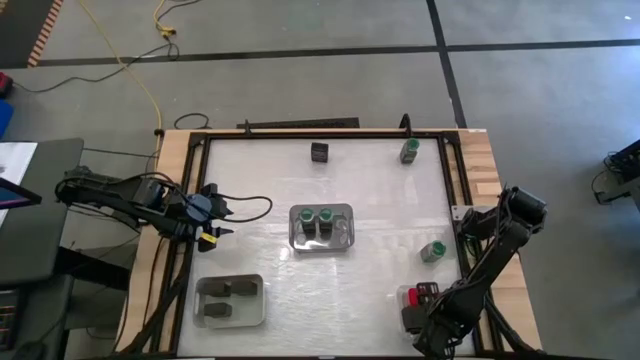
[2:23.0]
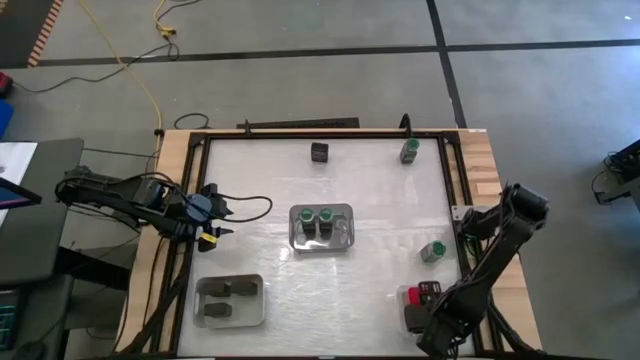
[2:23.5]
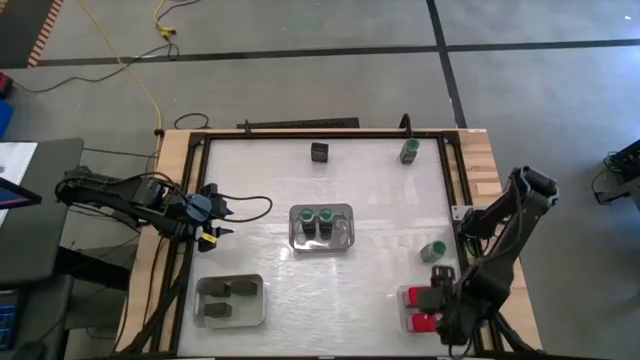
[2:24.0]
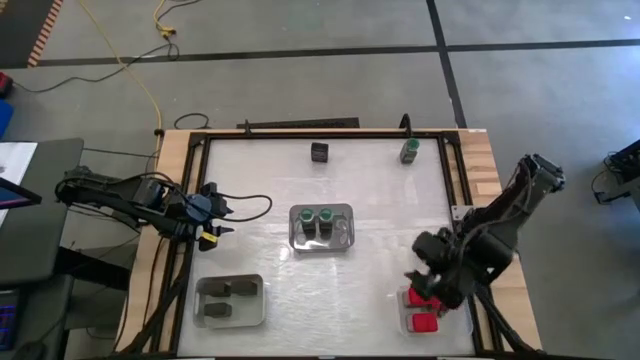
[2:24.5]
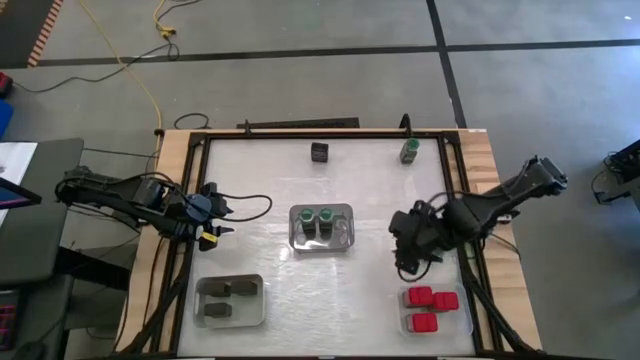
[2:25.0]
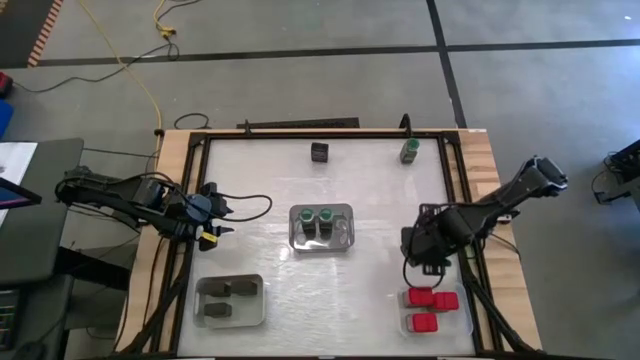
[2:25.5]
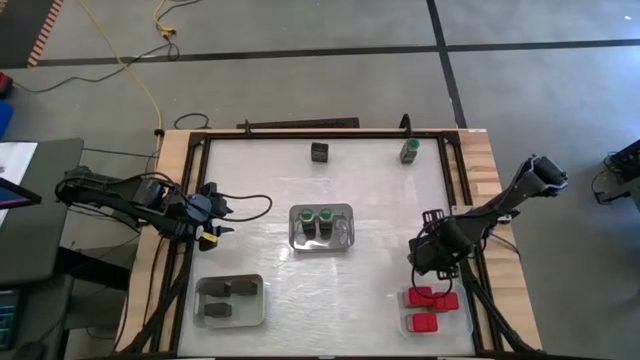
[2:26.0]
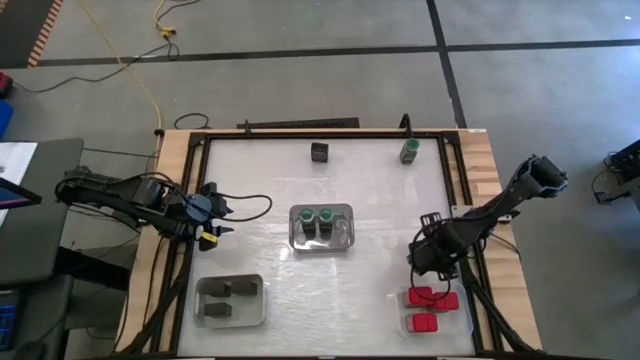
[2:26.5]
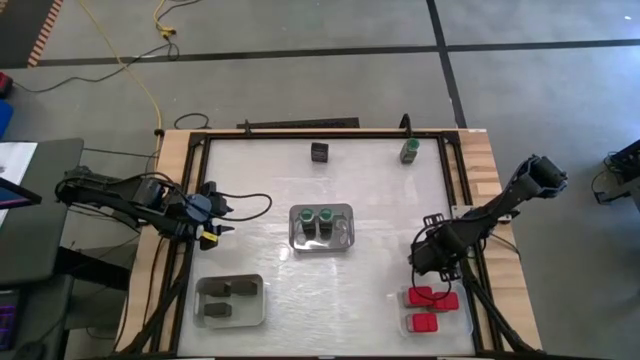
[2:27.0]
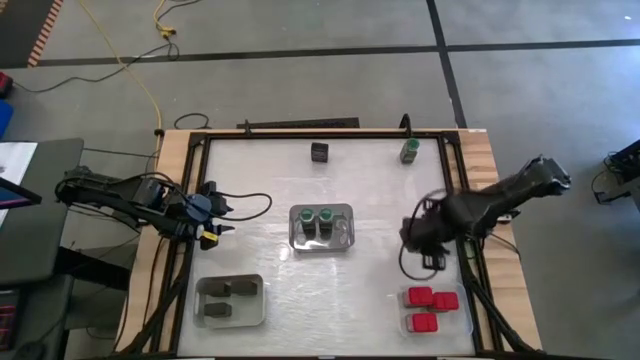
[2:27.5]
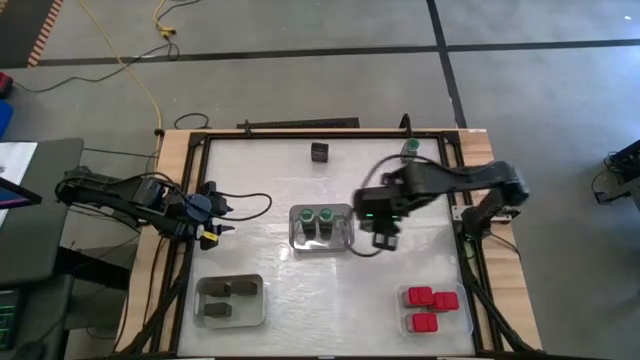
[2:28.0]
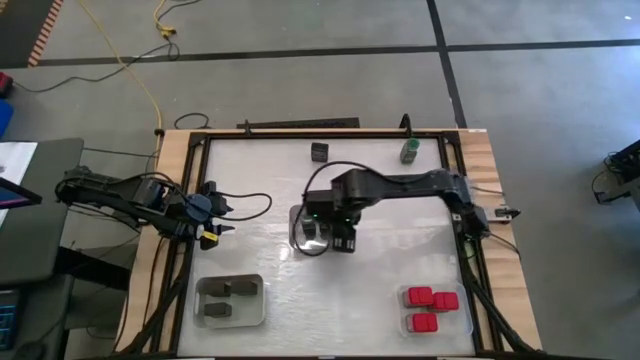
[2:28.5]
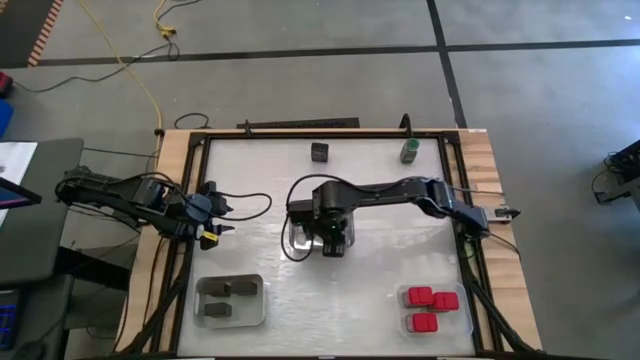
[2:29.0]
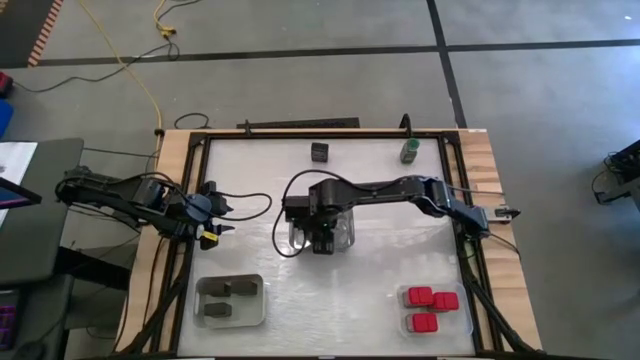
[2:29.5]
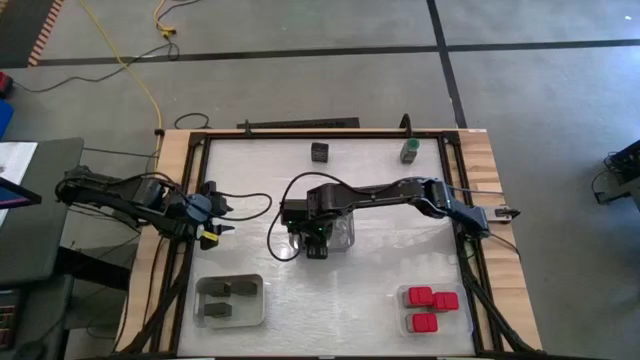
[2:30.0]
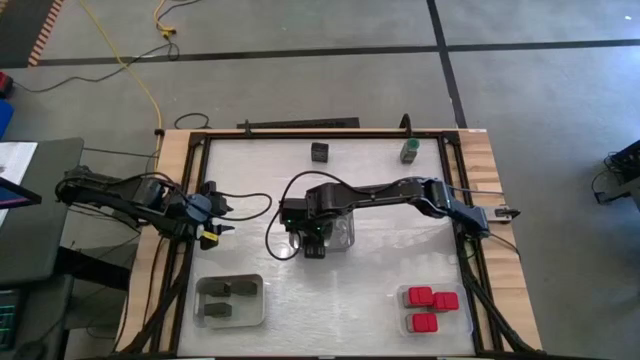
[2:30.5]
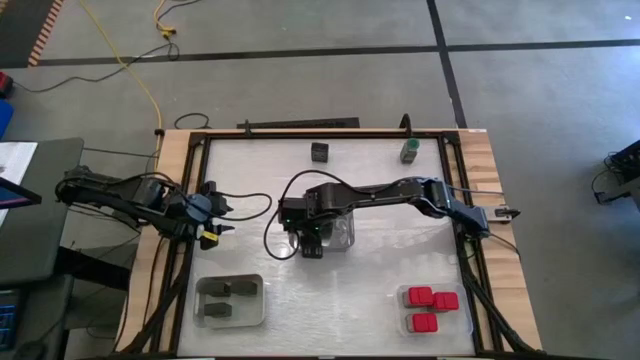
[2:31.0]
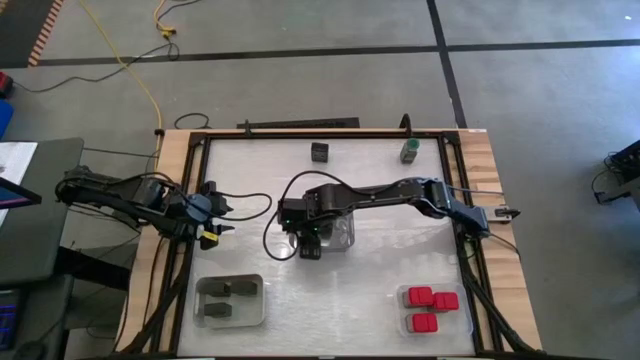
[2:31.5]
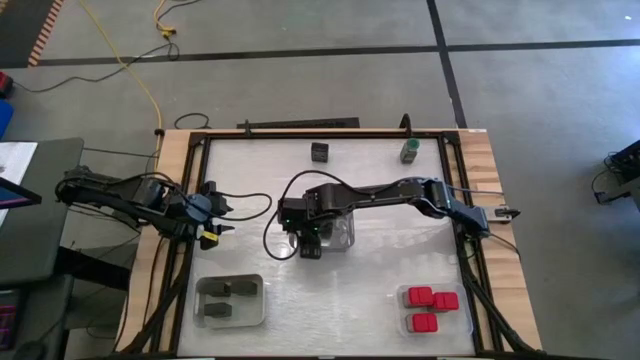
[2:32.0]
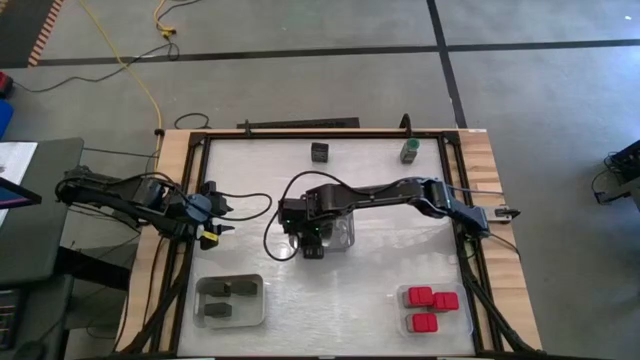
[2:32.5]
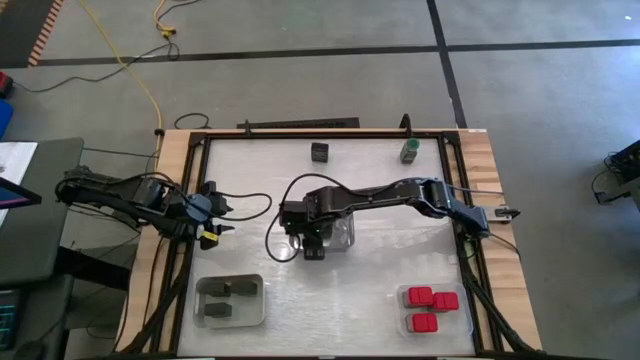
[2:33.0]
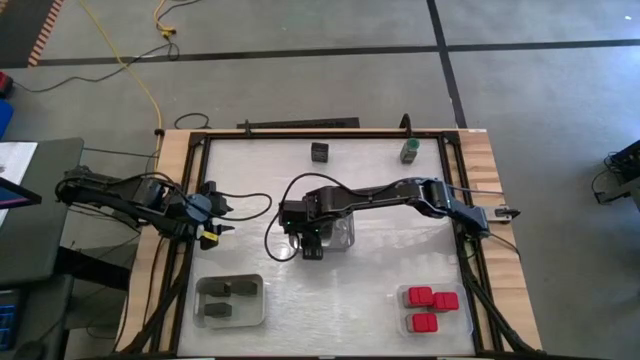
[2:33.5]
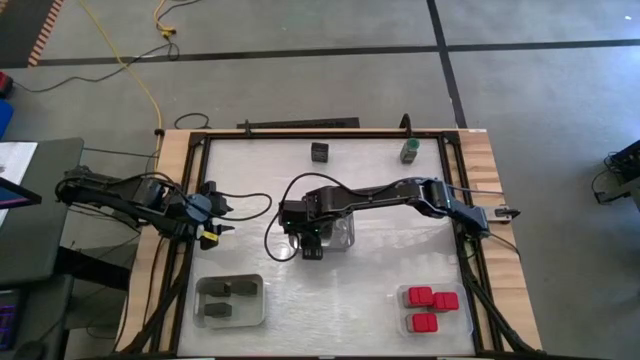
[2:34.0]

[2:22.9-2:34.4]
Task: Sort spices by type
Put the bottom green seasoning bottle into the black bin

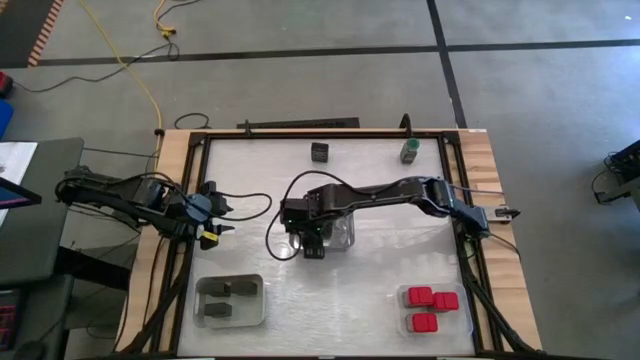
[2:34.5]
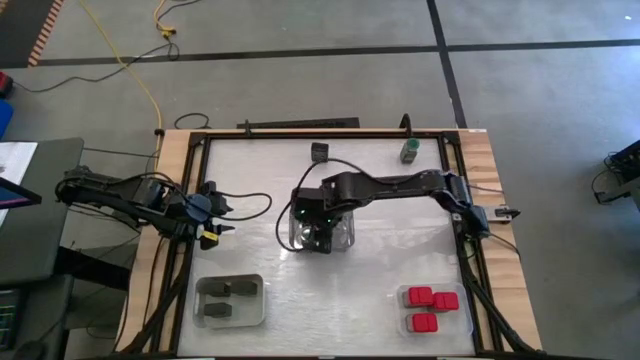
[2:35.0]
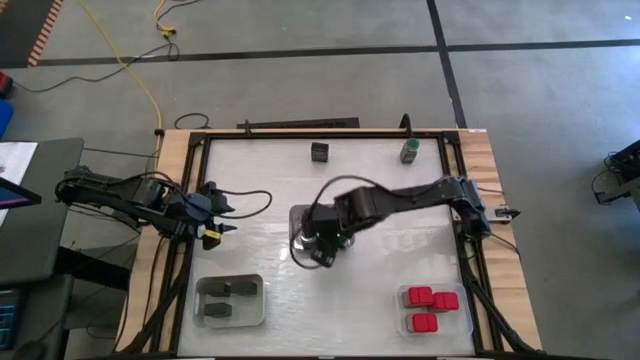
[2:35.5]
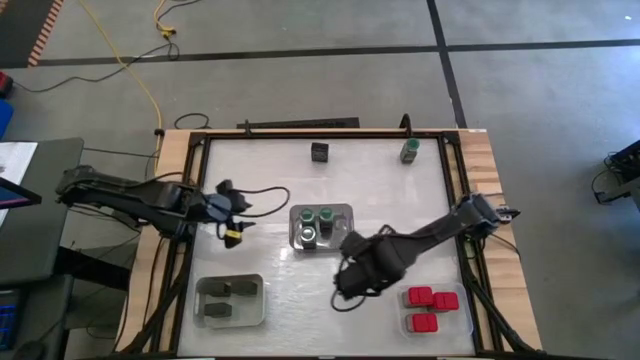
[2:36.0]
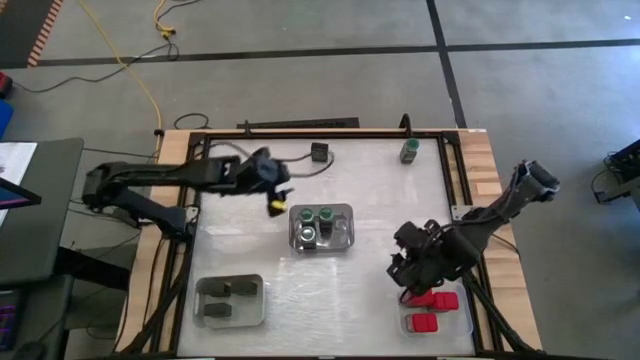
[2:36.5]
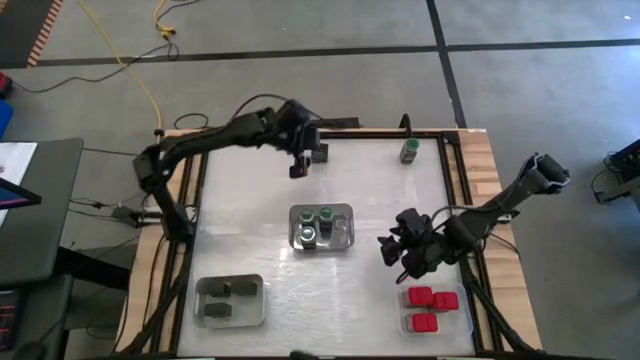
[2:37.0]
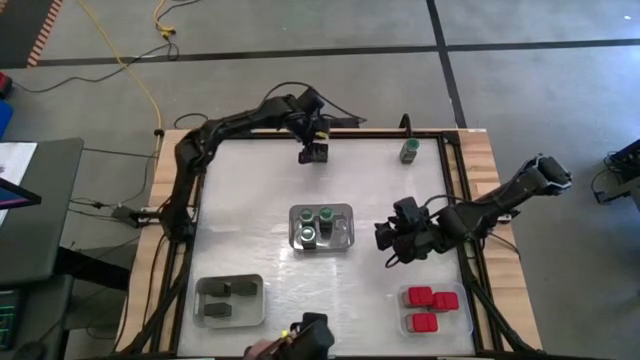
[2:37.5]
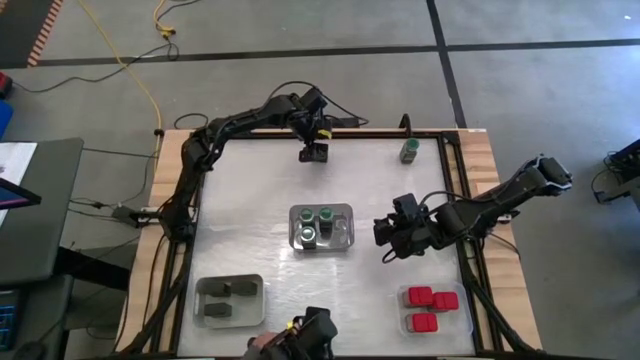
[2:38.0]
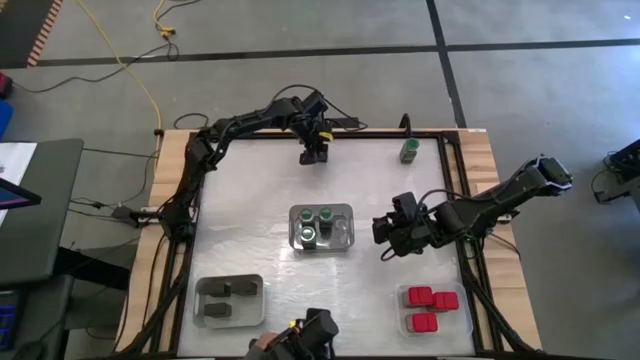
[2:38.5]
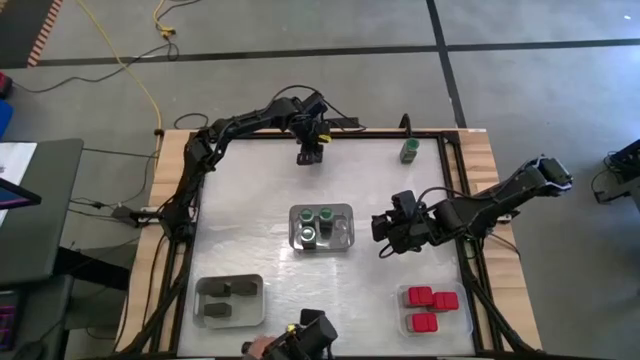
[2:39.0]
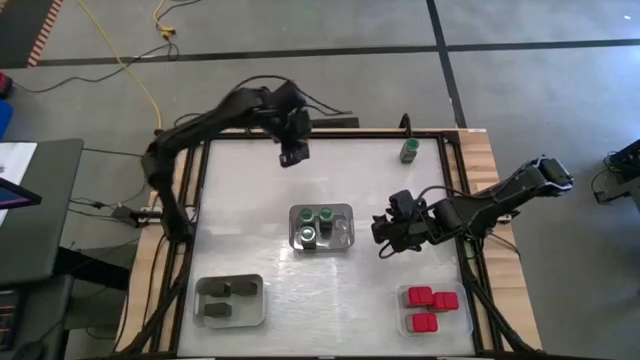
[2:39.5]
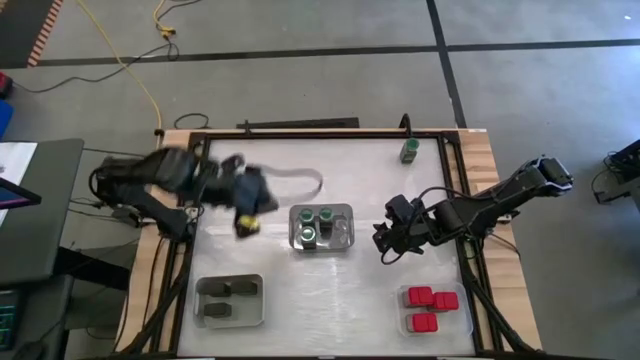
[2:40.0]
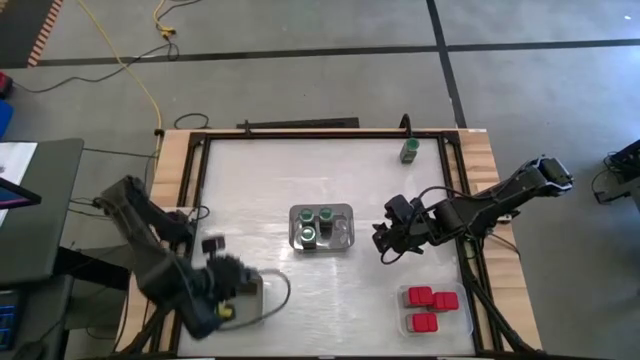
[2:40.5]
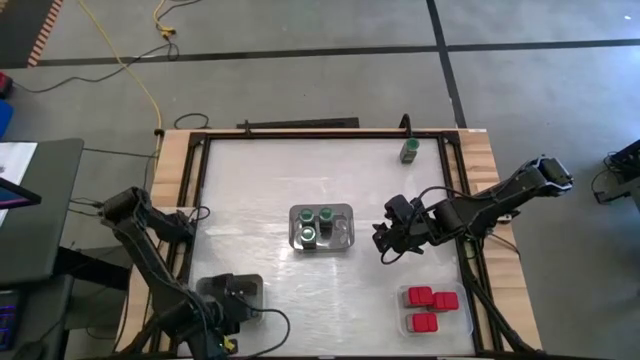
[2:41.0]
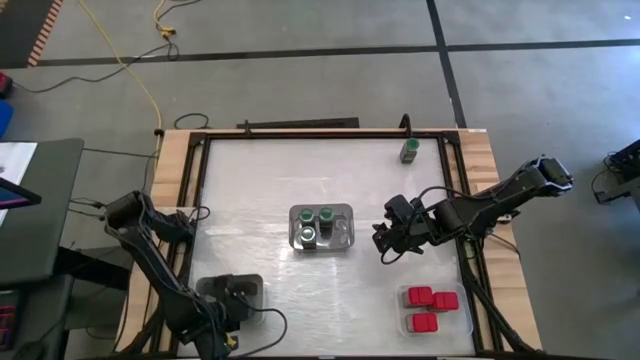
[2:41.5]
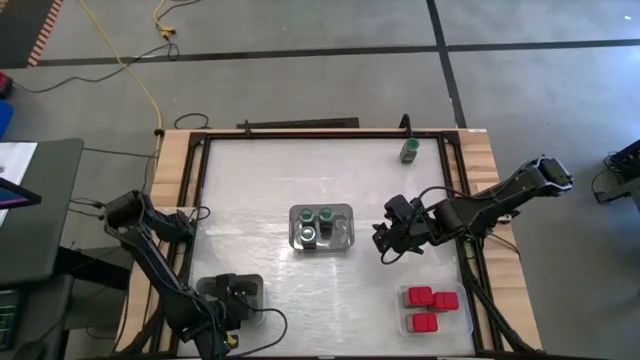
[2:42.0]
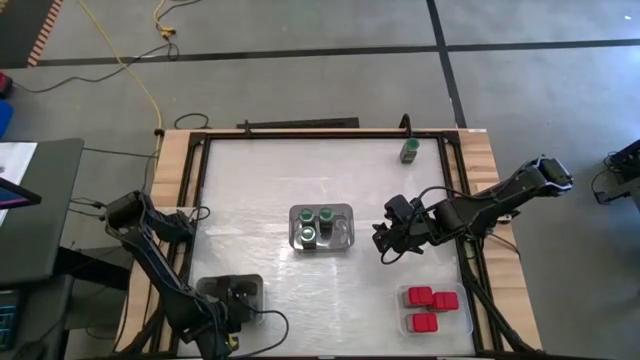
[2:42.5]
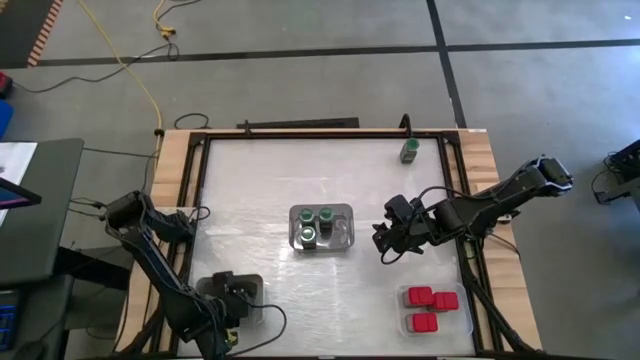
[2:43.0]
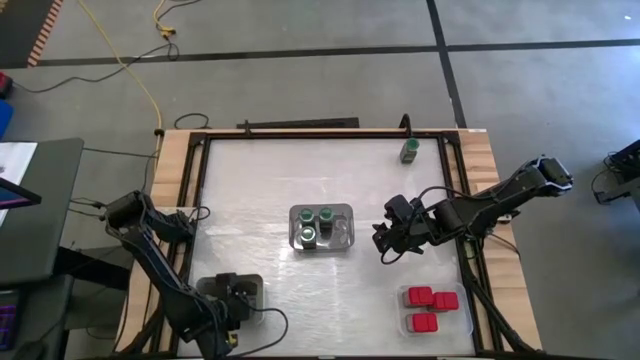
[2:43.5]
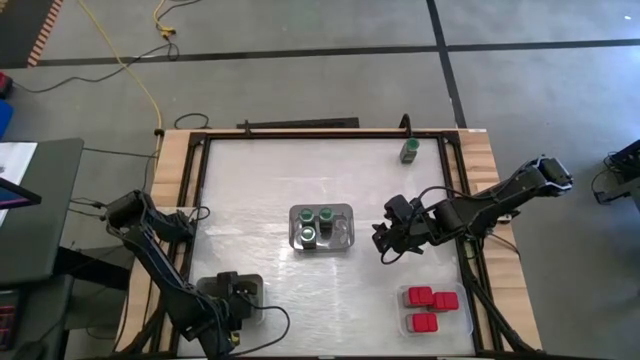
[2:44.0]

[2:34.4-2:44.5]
Put the black seasoning can into the grey bin

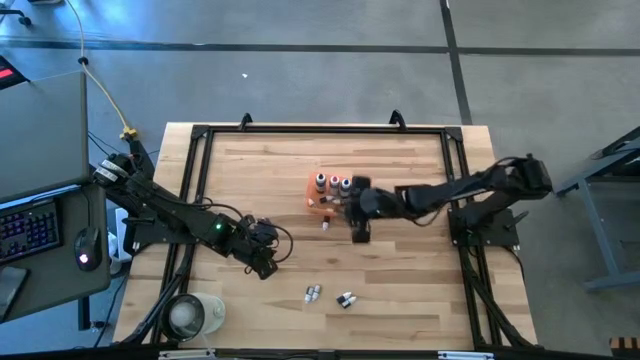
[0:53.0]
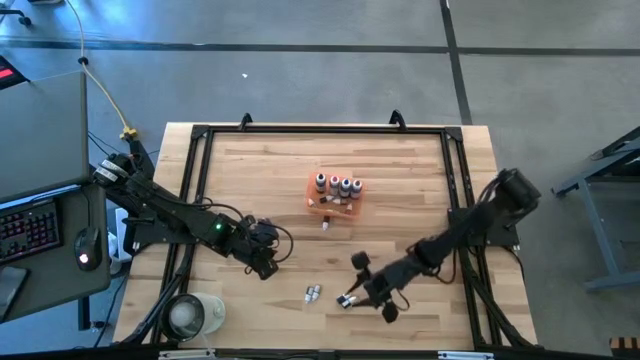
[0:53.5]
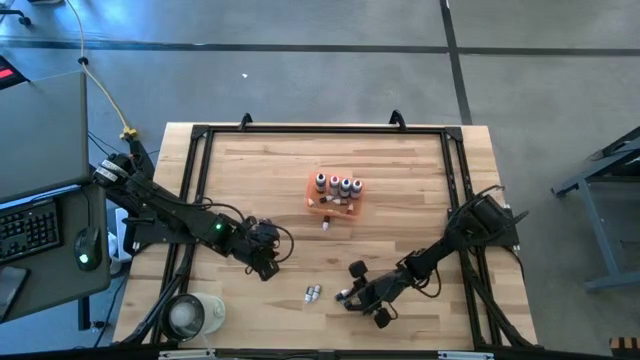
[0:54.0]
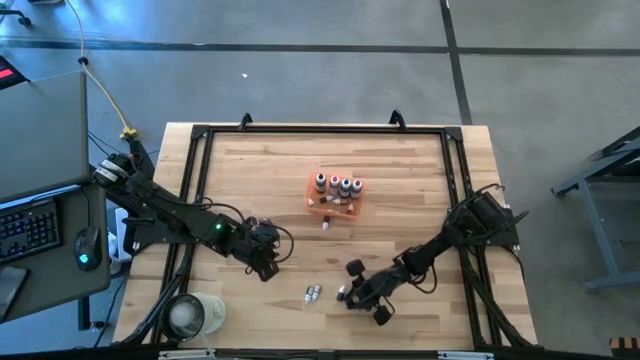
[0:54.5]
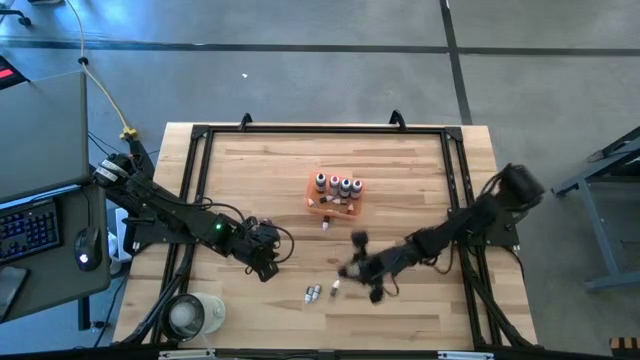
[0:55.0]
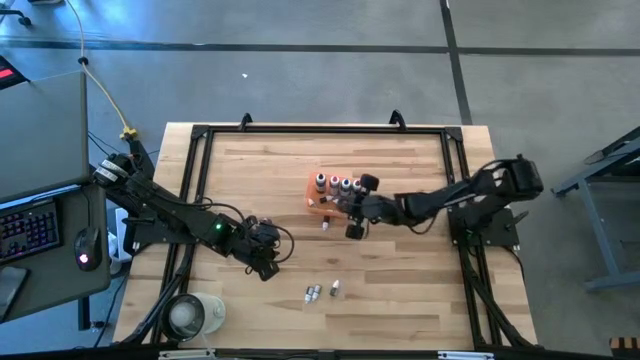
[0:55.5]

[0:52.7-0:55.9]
Task: Pick & Place food coloring
Put the bottom small black food coloring bottle into the orange bin
